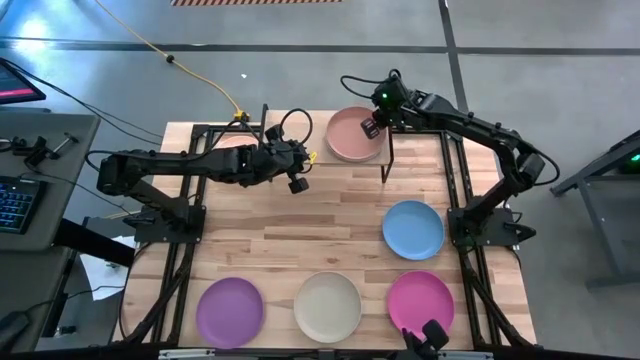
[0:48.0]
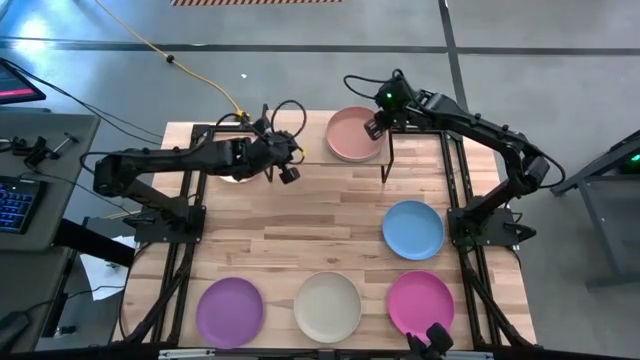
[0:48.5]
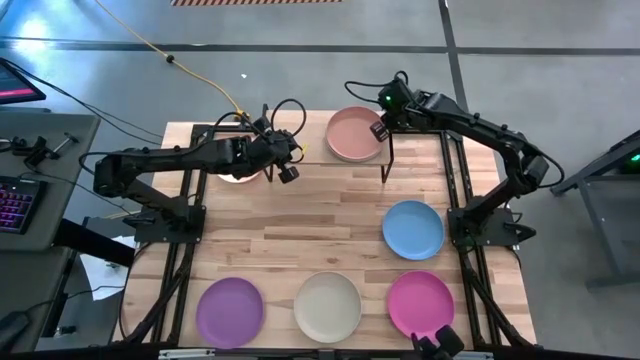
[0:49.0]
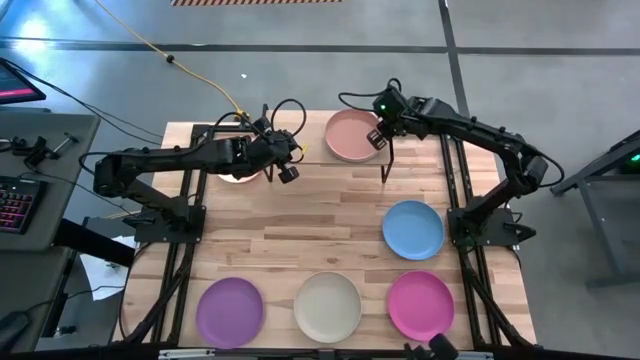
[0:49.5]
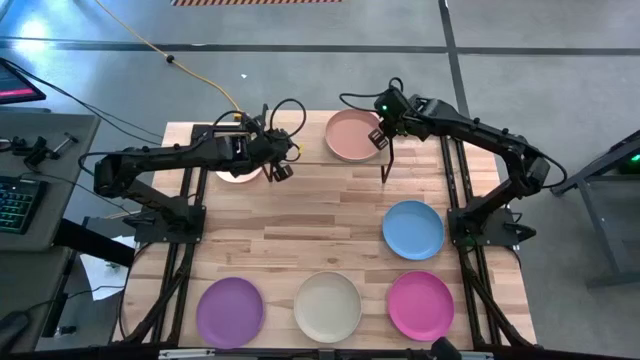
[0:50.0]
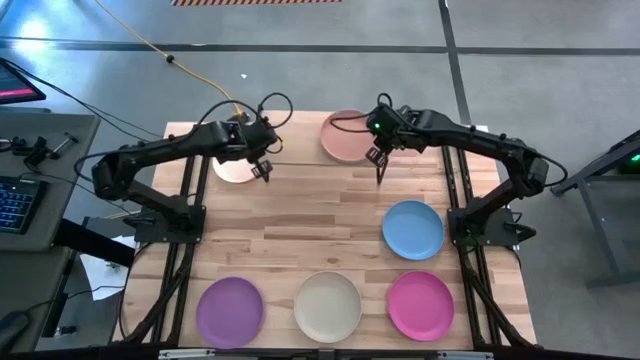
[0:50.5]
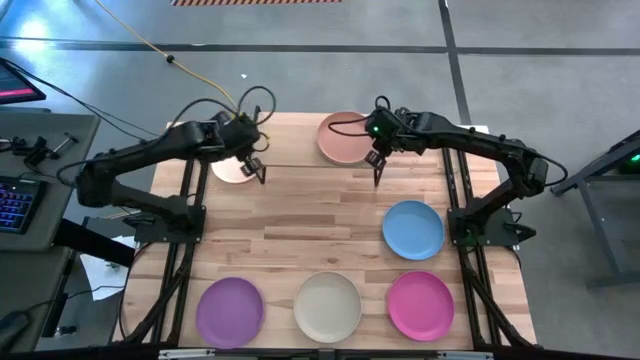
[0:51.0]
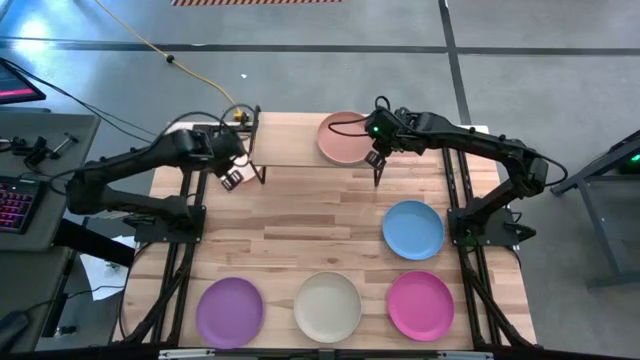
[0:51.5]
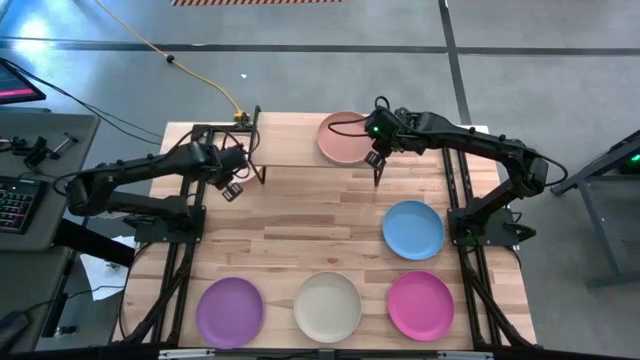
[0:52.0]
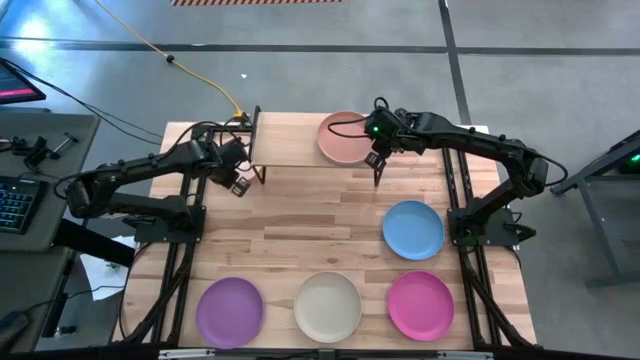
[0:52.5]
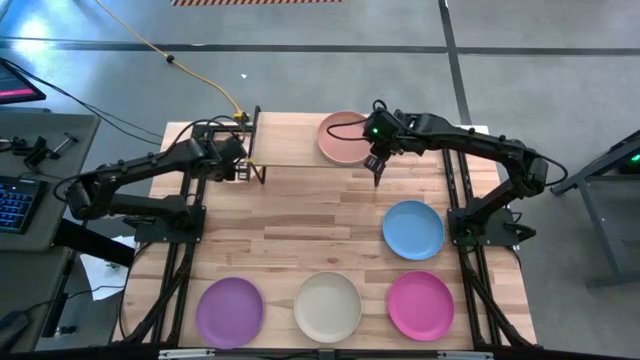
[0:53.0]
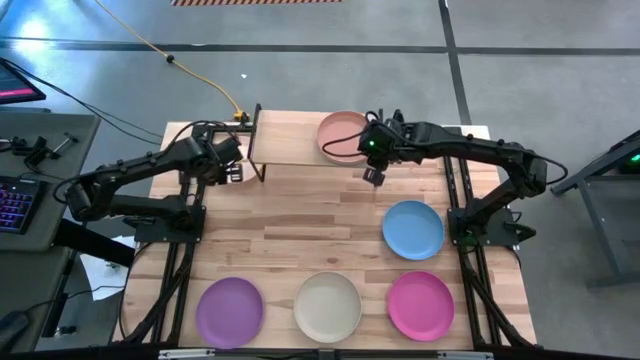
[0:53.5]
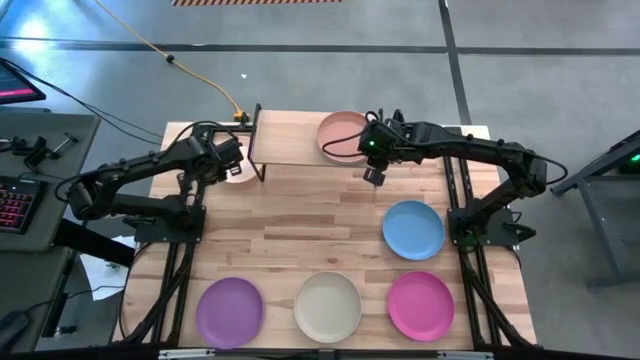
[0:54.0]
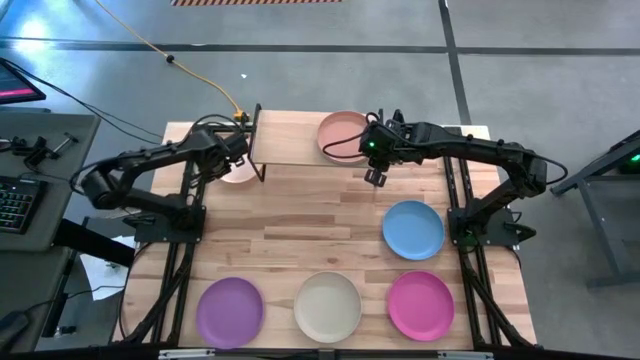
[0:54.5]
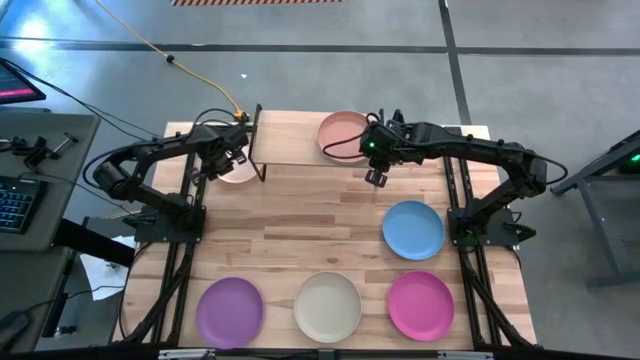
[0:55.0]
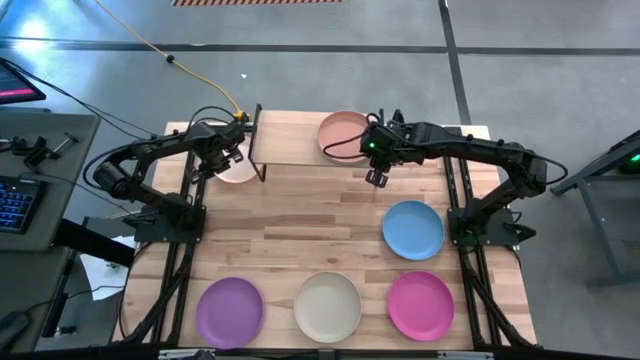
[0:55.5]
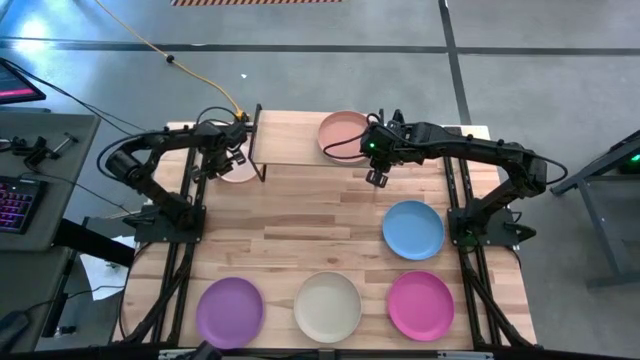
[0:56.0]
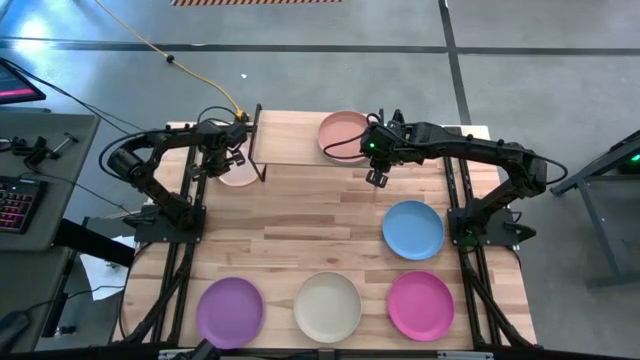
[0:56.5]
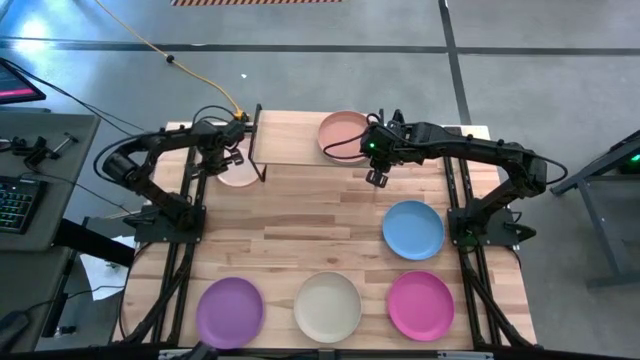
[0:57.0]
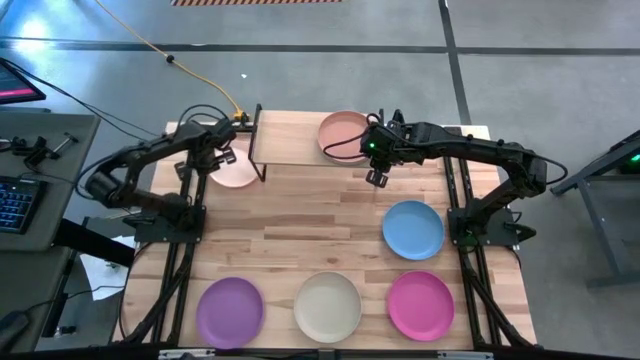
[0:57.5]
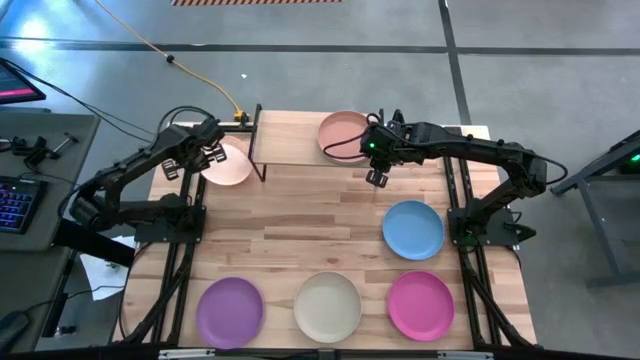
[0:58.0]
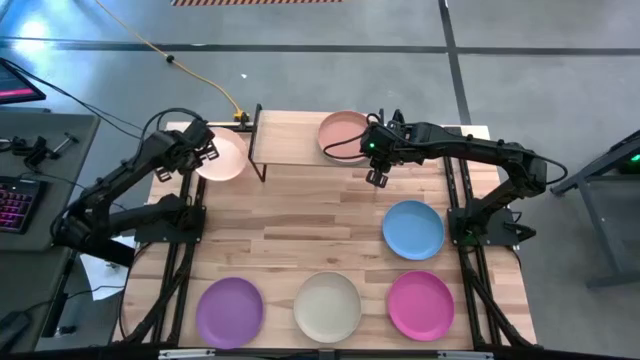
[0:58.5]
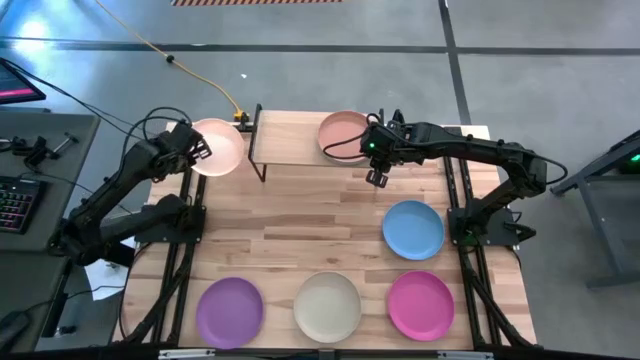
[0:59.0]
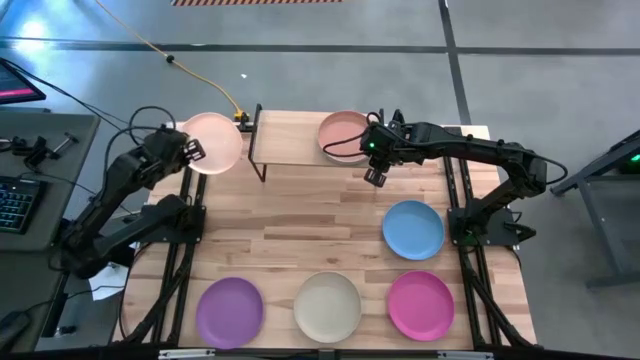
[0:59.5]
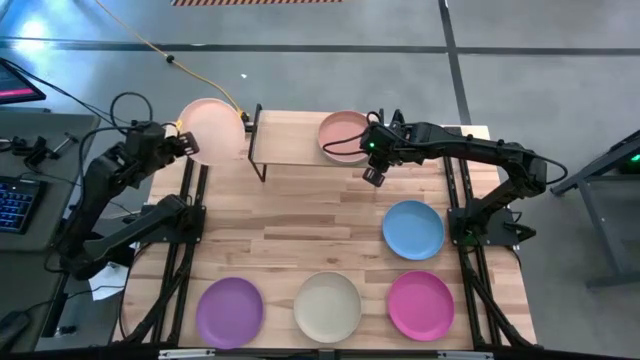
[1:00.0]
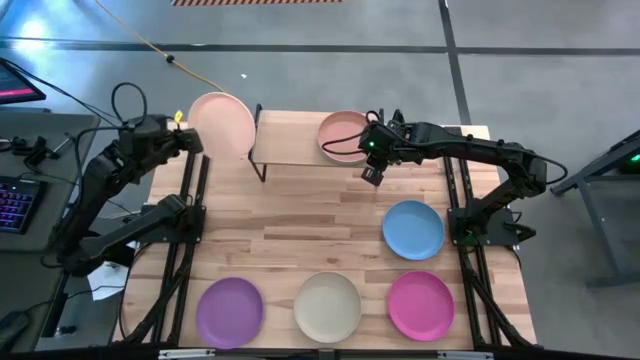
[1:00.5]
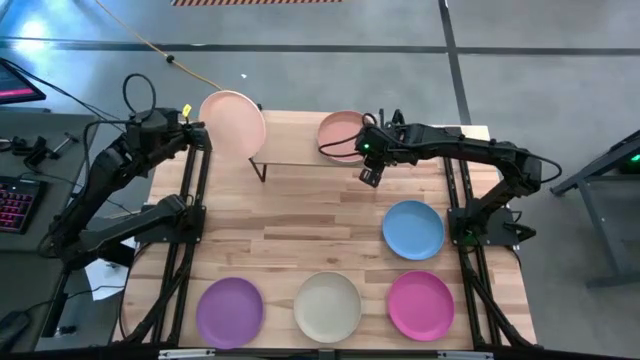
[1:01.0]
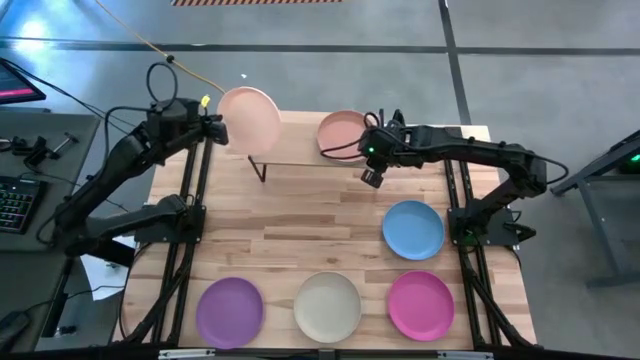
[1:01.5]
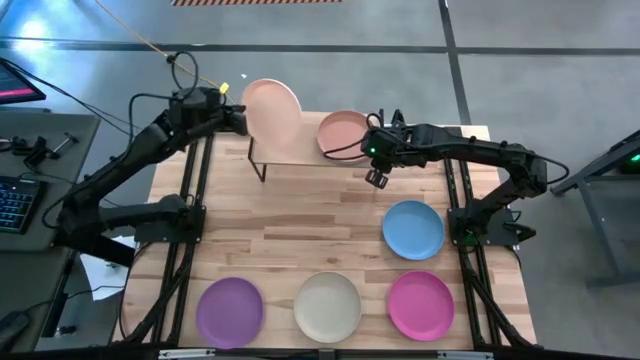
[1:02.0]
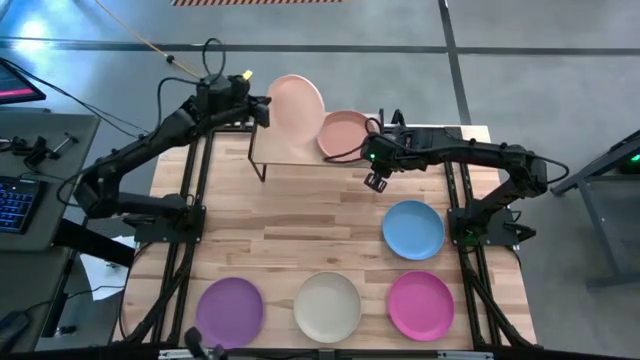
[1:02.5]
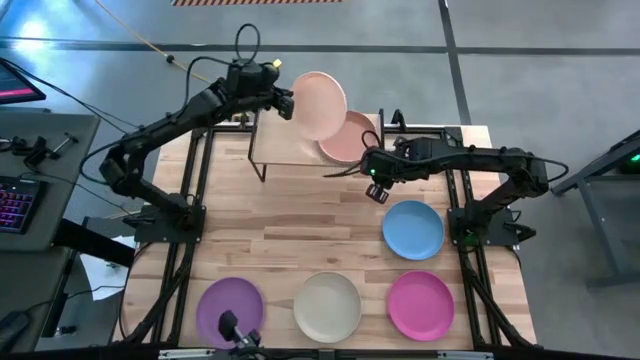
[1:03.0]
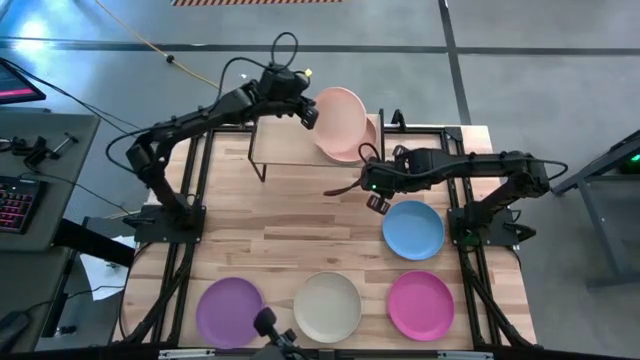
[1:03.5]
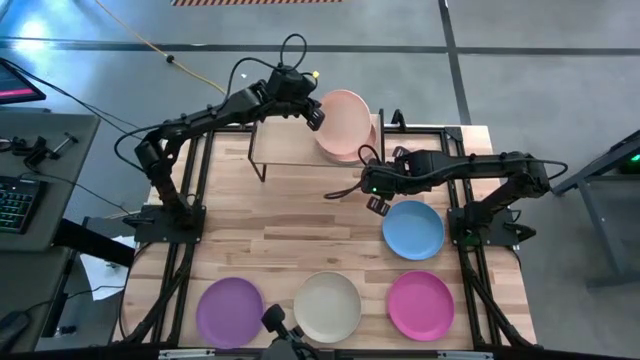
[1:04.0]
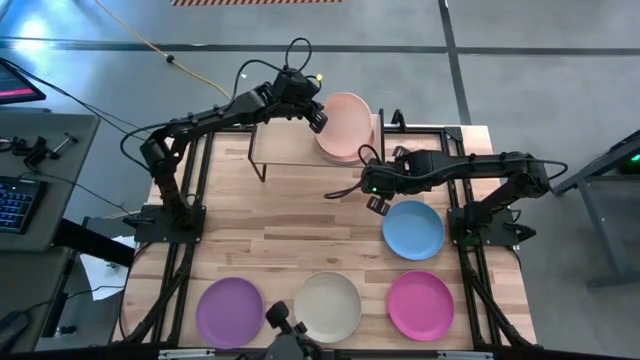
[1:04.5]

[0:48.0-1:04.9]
Task: Place and stack plates onto a shelf
Stack the light pink plate into the light orange plate on the shelf

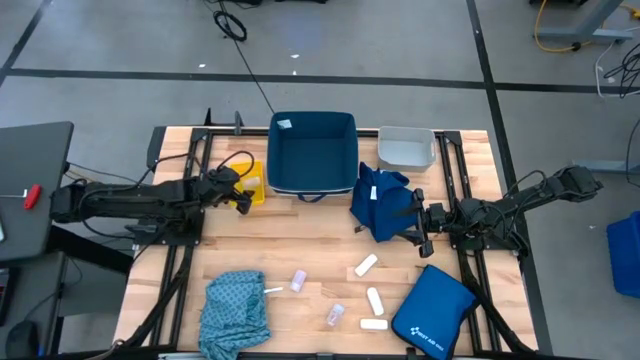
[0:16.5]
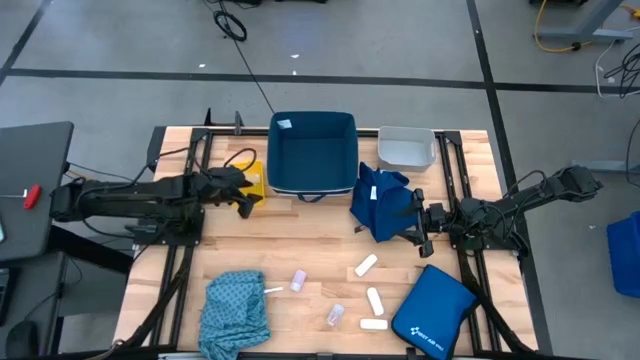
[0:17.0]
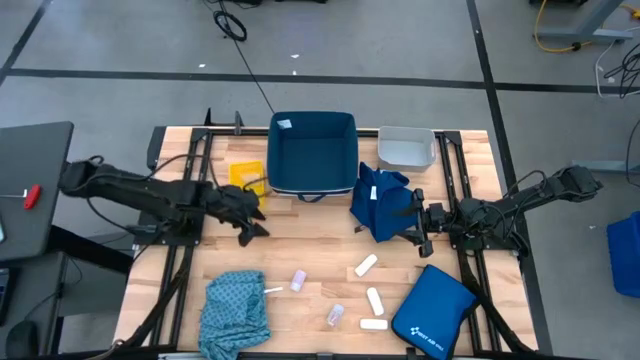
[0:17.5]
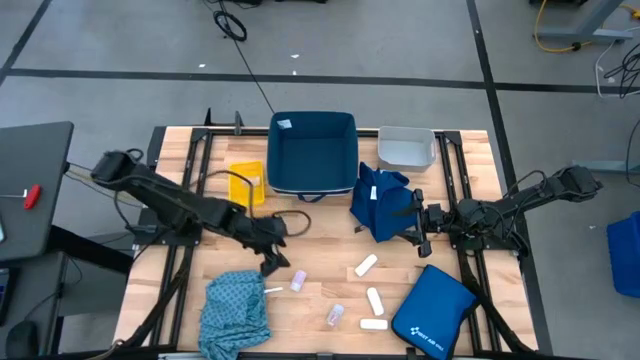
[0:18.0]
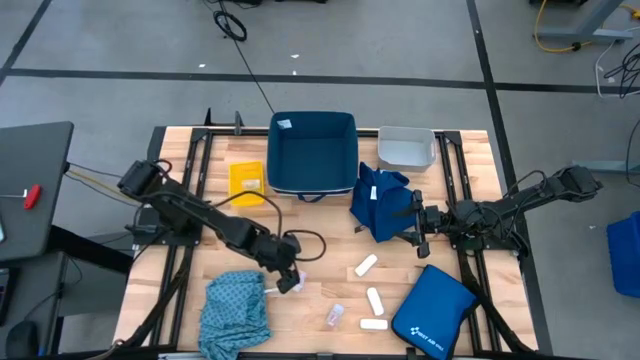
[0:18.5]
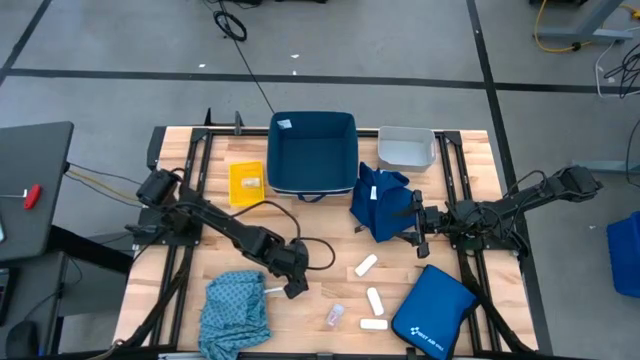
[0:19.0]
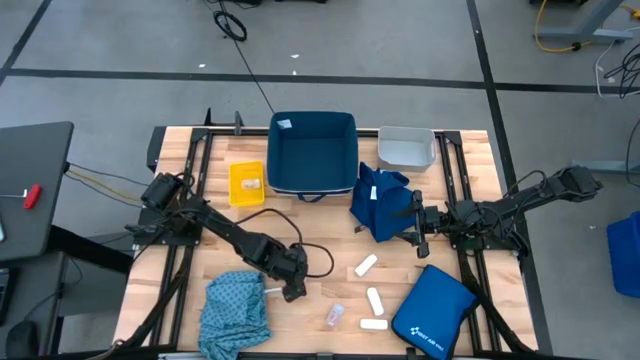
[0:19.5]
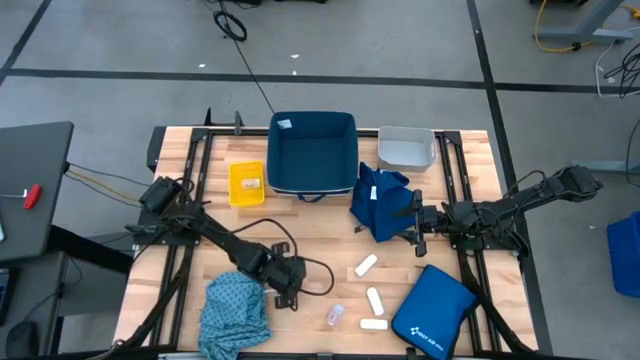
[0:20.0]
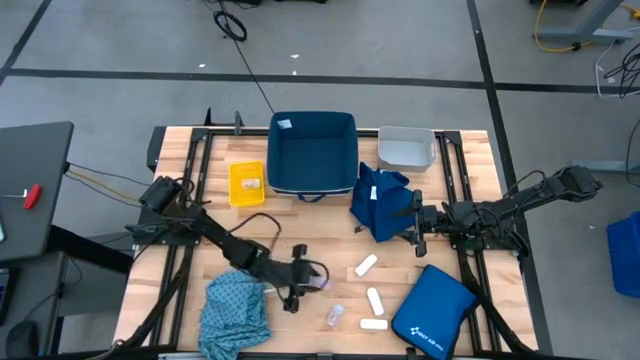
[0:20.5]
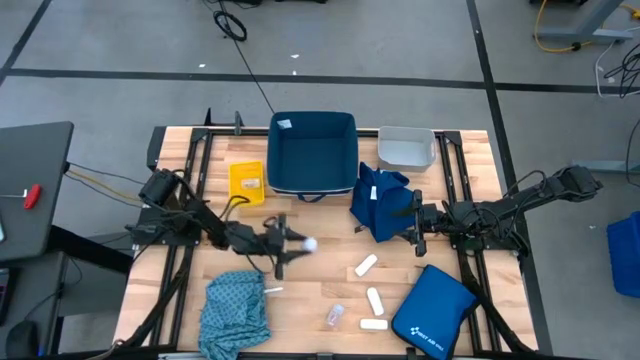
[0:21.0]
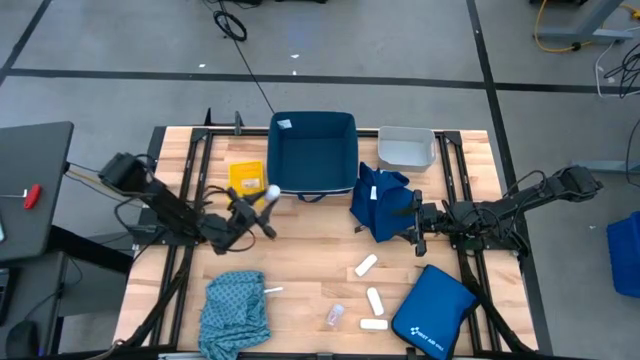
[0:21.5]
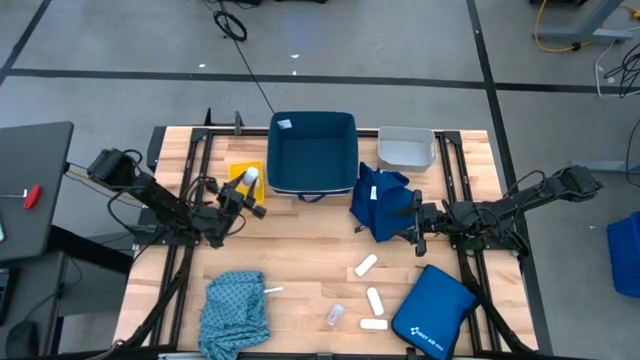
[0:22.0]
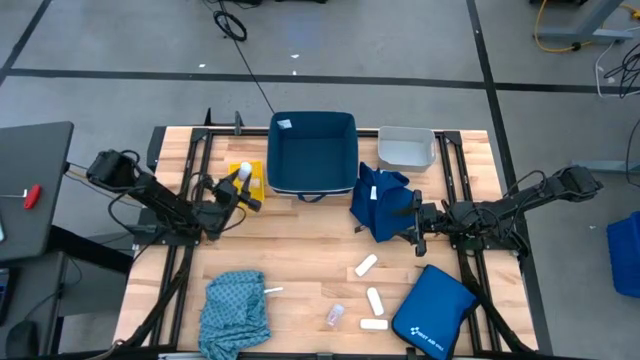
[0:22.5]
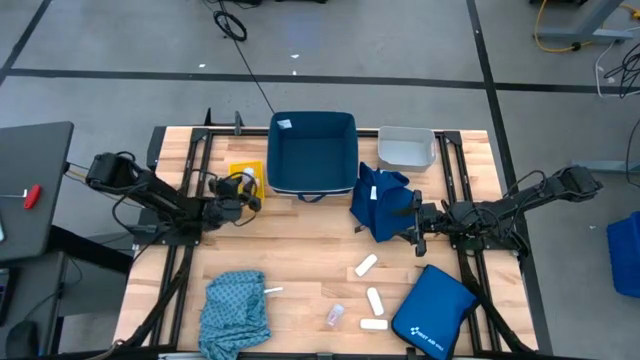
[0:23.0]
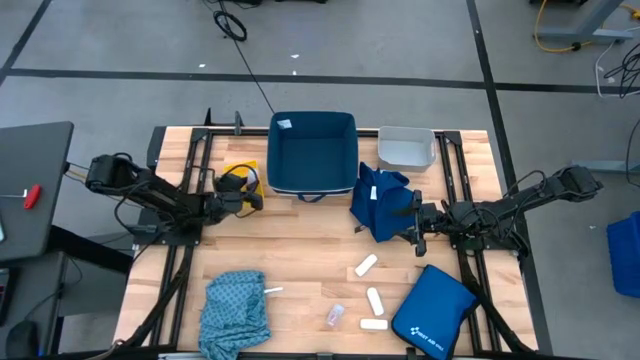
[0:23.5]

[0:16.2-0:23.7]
Task: Pick & place medical supplies in basket/bin
Put the top white pill bottle into the bin
